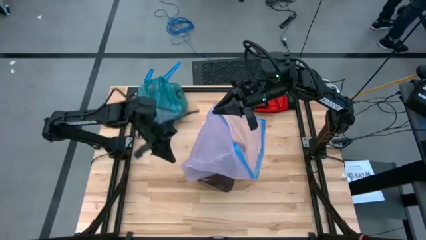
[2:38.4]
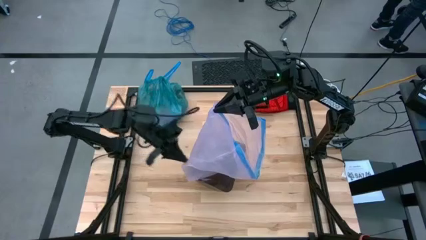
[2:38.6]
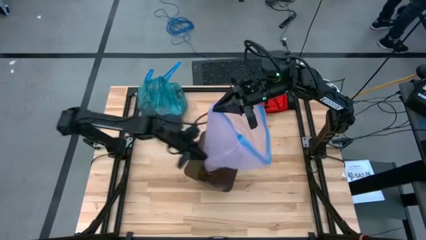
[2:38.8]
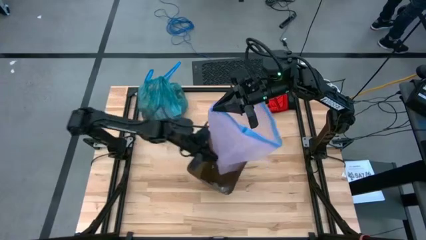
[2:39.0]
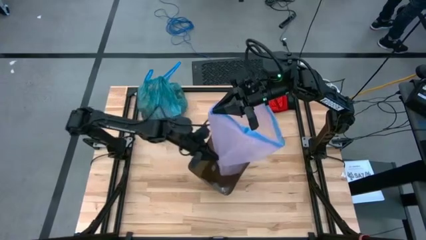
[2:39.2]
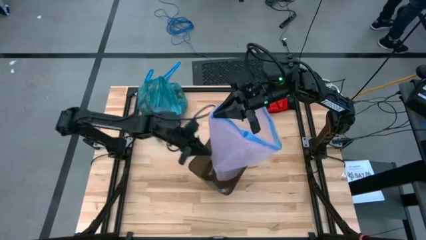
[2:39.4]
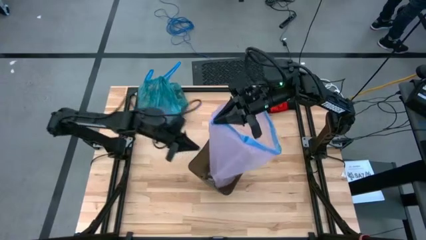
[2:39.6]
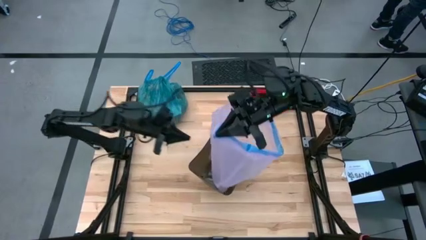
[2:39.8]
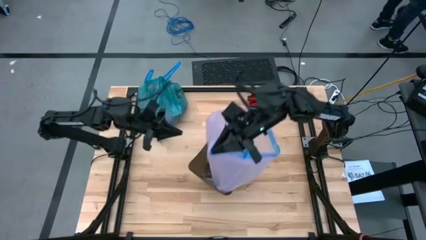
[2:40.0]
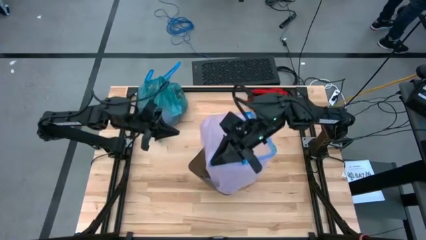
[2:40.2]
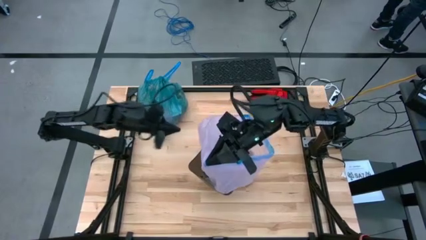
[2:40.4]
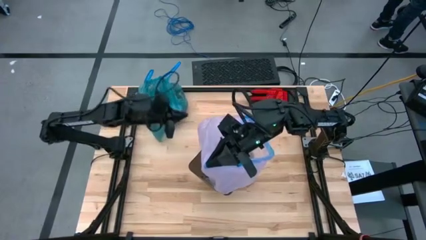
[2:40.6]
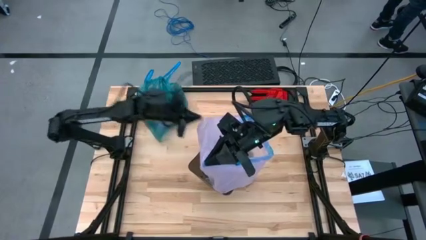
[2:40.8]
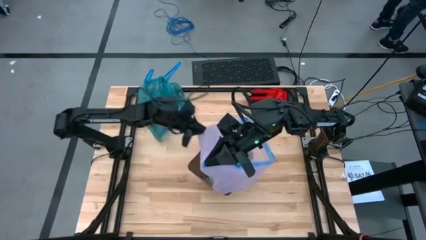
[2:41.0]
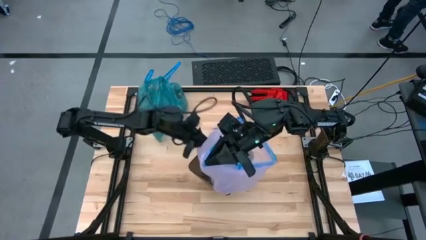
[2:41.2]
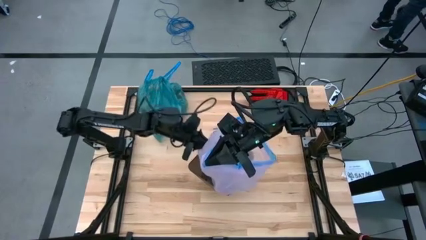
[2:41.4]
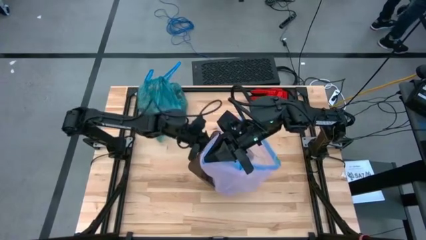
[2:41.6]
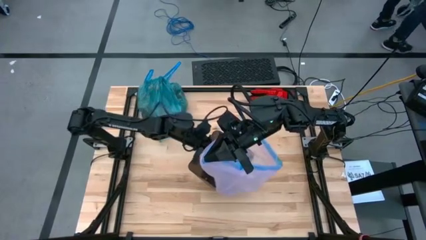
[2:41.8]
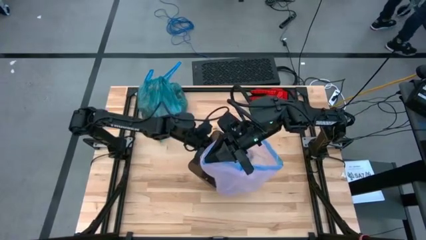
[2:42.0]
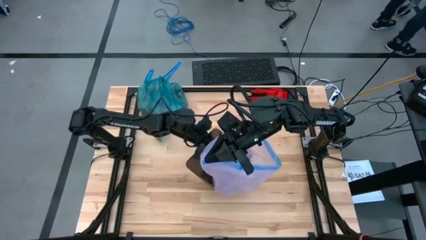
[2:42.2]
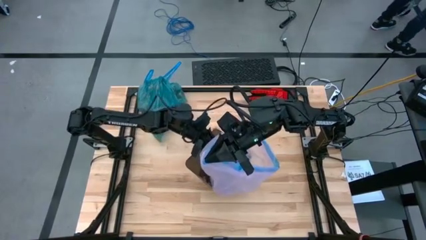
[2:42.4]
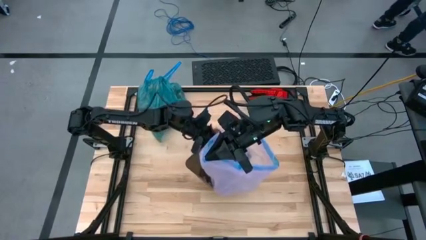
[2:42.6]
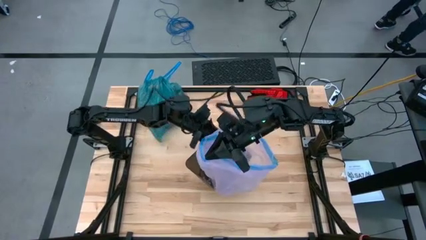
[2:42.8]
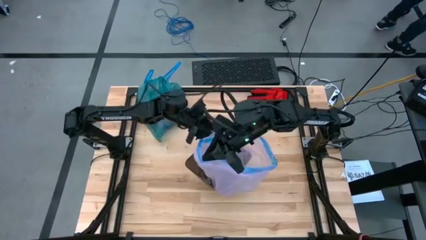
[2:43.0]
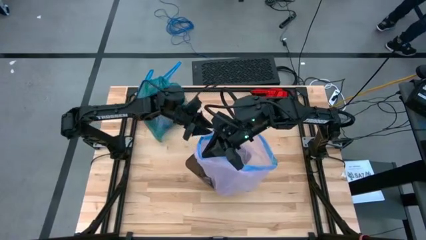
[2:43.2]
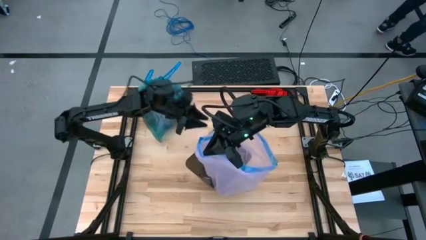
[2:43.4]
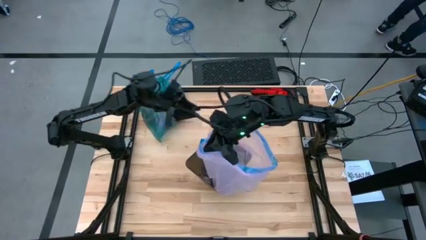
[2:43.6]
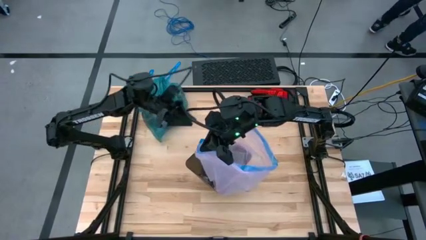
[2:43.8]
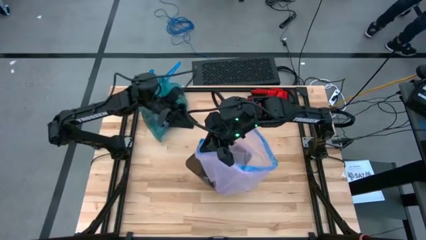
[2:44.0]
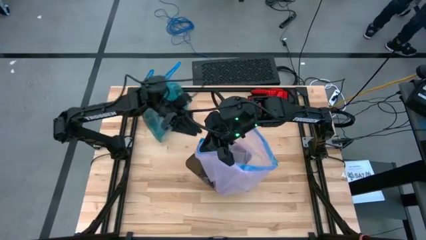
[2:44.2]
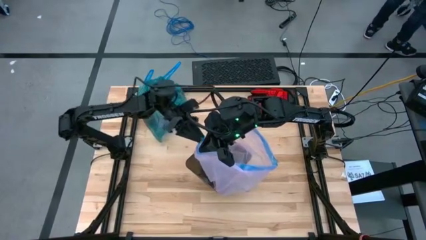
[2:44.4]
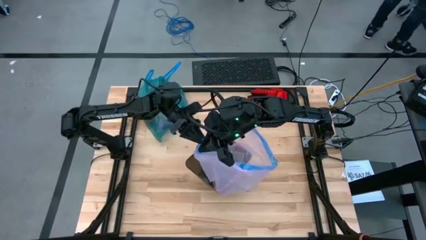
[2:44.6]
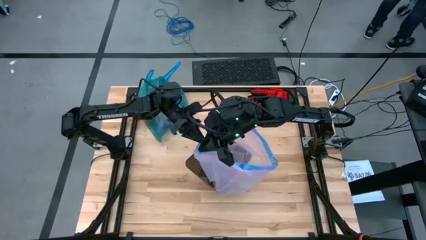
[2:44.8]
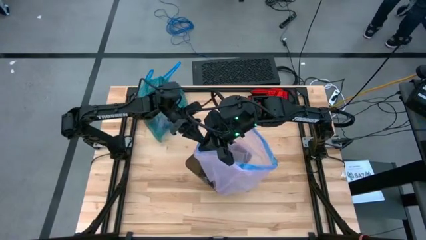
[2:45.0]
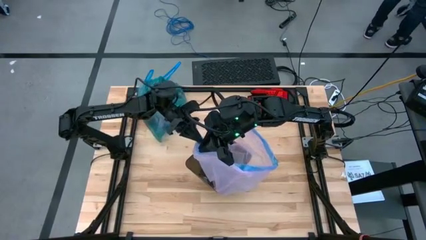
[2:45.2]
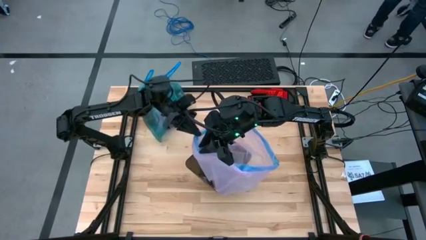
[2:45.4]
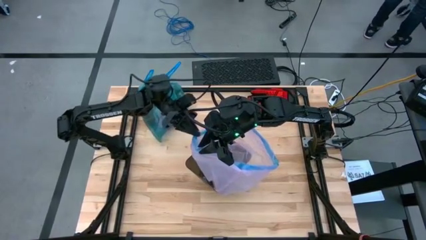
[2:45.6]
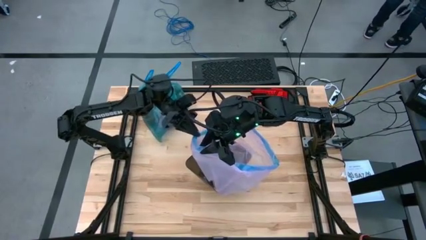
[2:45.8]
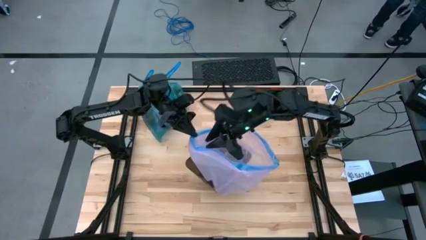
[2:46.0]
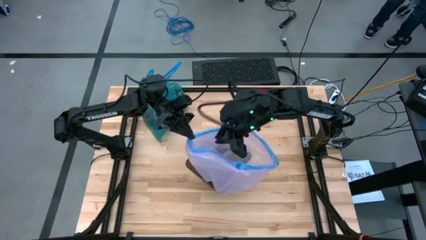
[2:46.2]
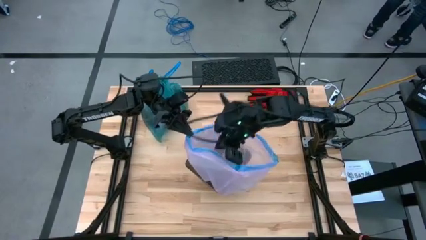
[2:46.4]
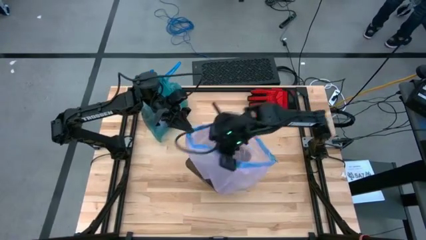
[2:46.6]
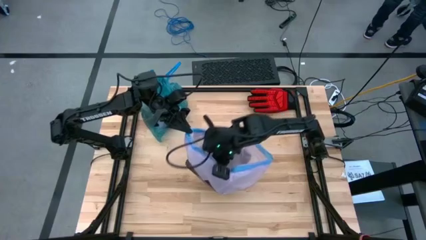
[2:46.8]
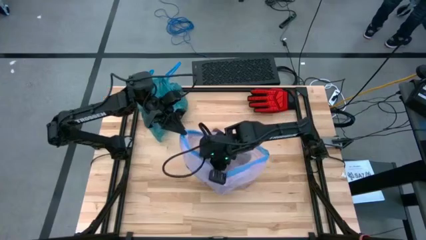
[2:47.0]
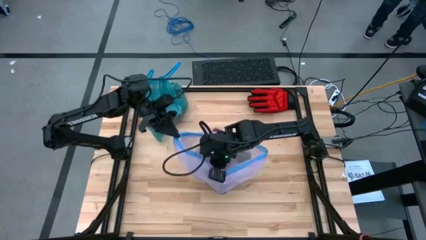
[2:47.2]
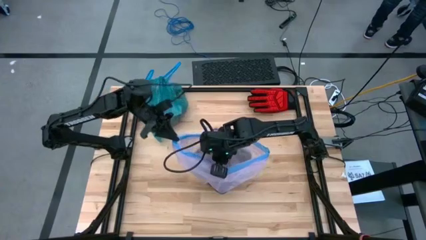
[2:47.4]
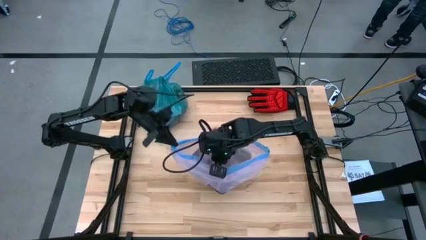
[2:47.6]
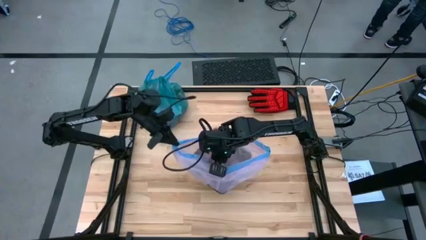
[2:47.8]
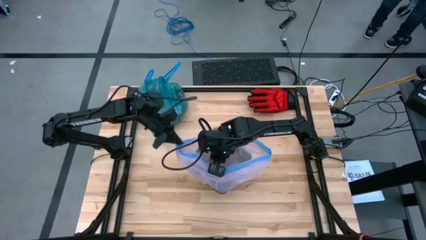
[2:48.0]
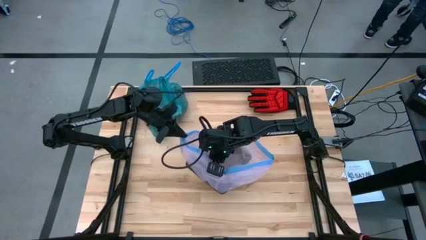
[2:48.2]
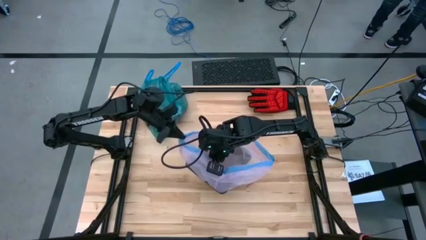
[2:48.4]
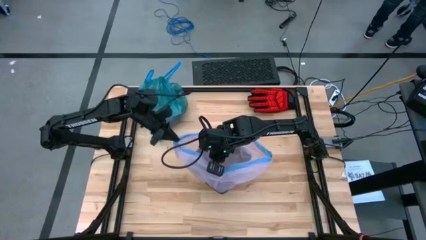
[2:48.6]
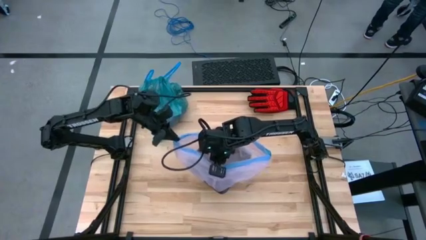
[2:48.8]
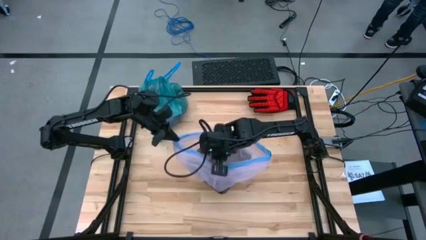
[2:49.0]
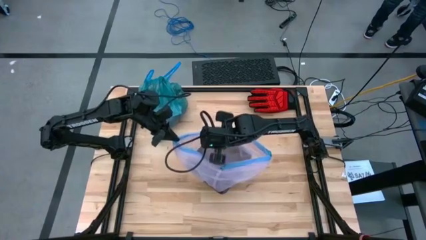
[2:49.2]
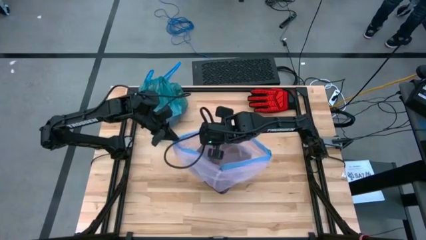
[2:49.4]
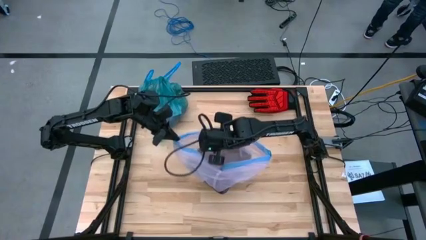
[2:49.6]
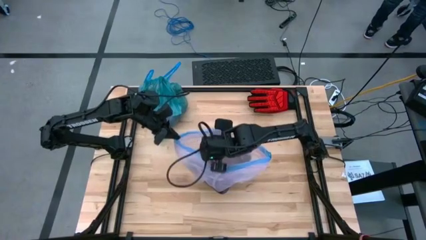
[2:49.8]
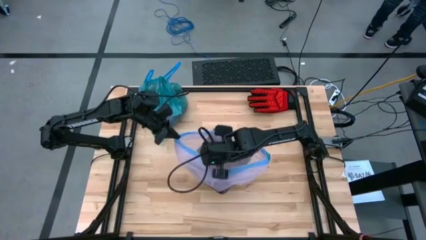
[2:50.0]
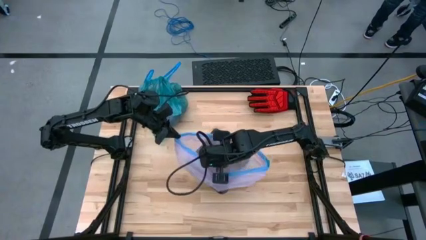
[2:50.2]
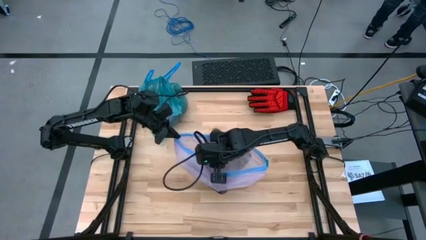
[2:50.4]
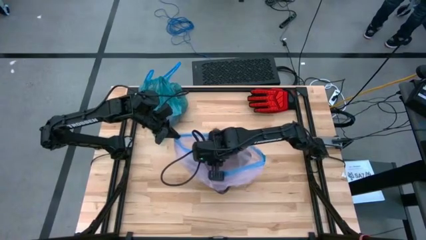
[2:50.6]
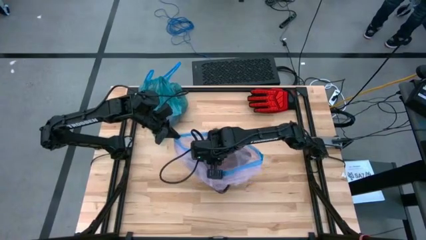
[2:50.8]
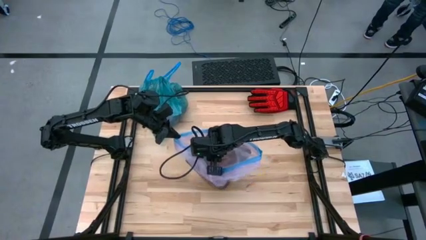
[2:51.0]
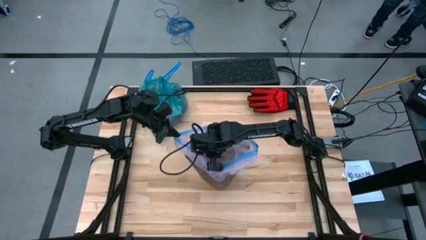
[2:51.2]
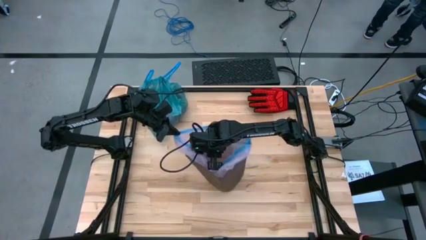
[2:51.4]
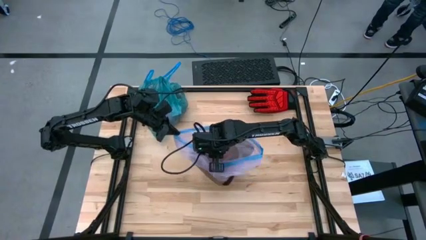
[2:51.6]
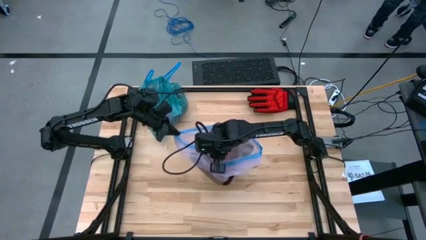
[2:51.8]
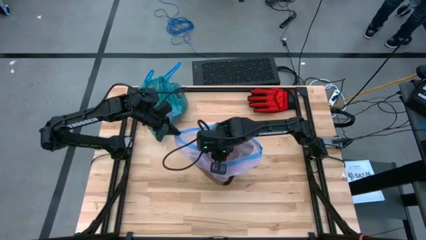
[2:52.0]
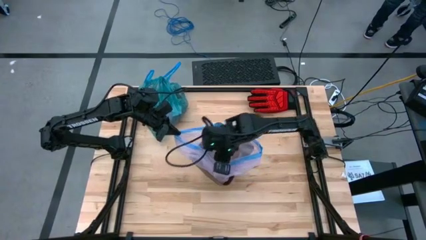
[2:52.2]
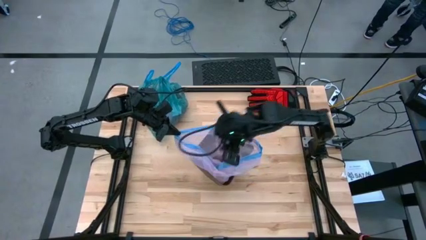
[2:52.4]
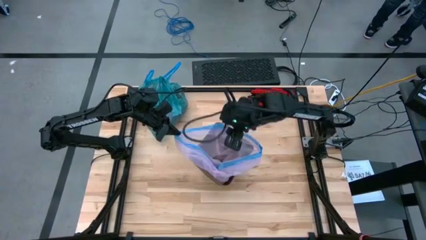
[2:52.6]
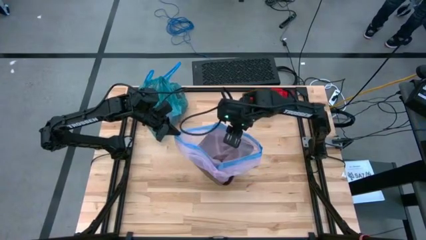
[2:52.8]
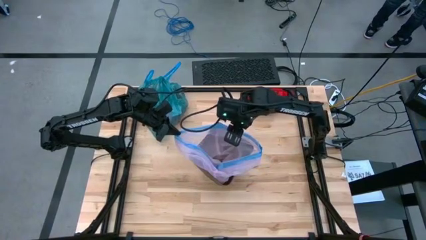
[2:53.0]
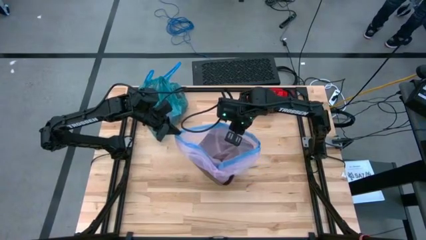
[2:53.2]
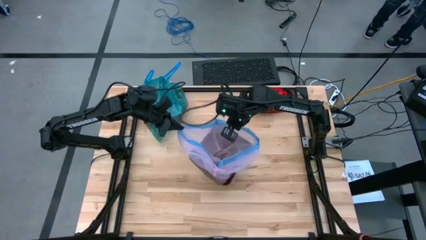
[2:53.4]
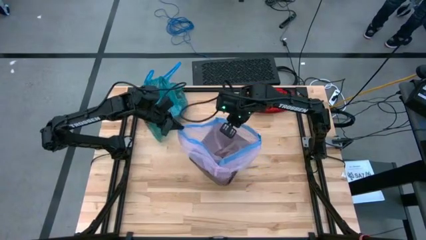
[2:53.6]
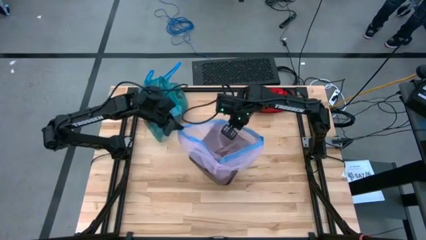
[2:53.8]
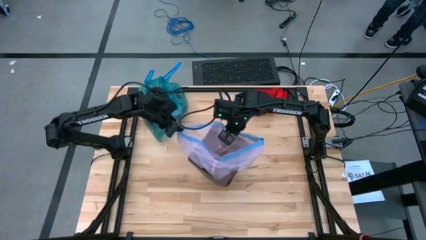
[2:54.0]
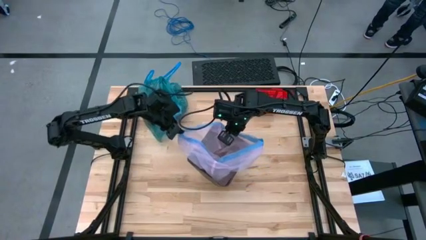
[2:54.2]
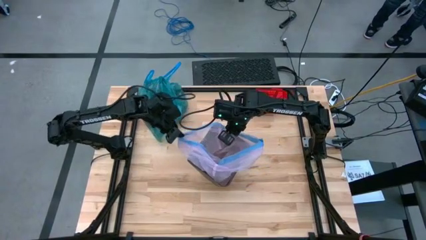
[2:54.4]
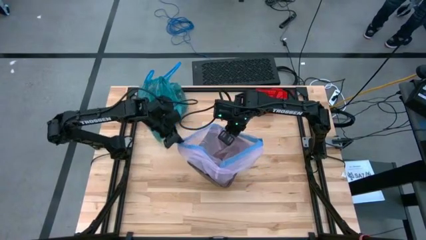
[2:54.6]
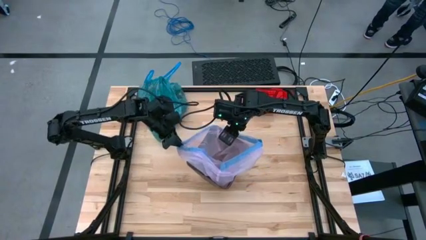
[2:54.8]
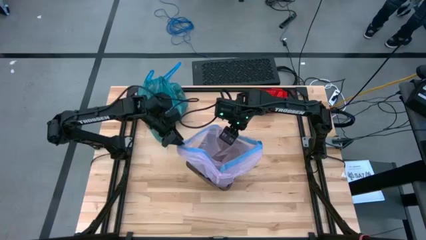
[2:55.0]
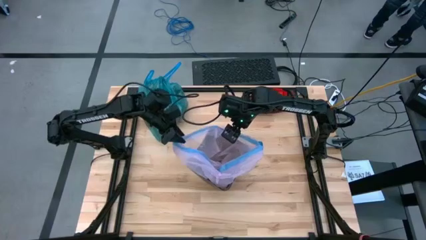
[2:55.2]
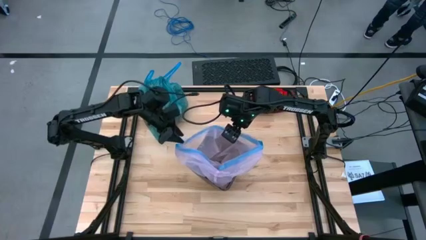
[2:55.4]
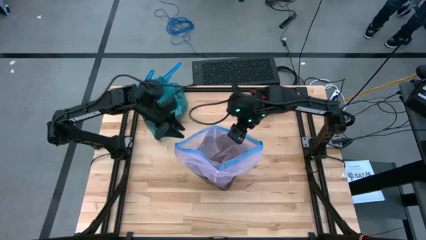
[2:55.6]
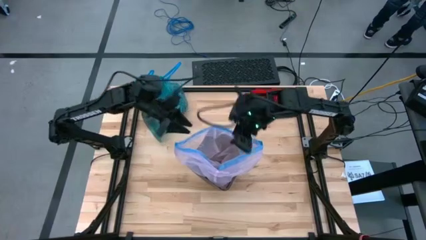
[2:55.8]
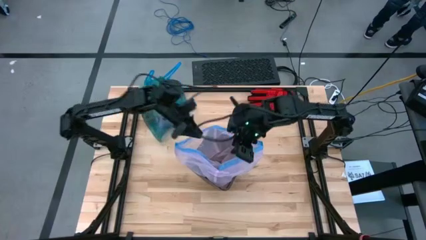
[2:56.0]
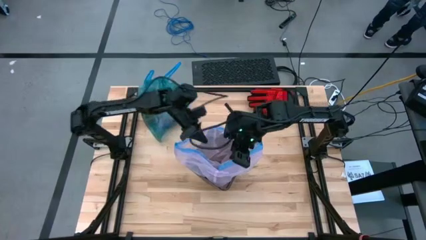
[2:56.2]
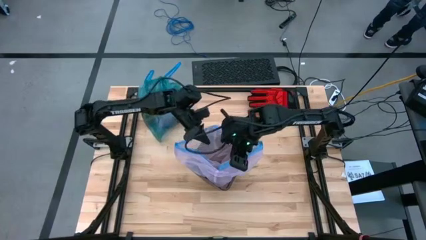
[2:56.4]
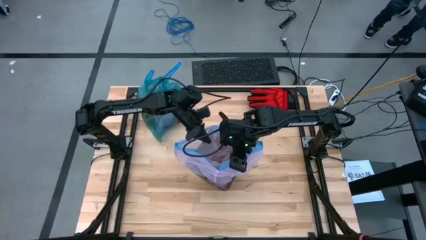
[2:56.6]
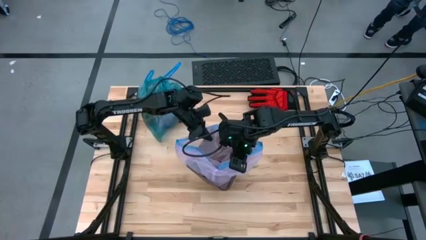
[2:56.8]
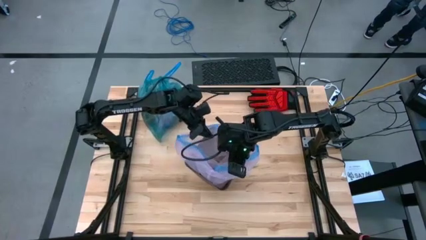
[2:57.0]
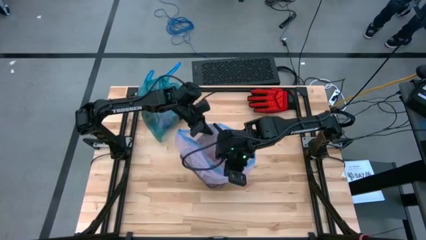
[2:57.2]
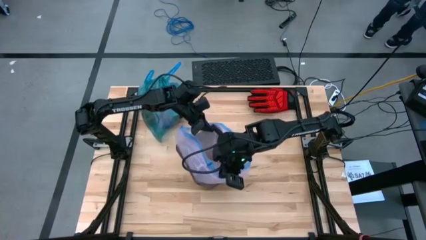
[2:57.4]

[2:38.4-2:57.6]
Task: place trash/remove bag and relplace
Insert the new pink trash bag into the trash bin
